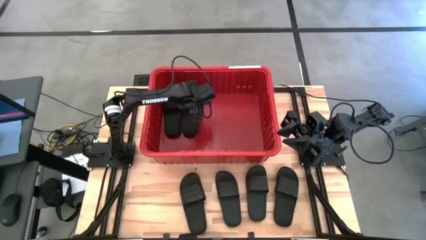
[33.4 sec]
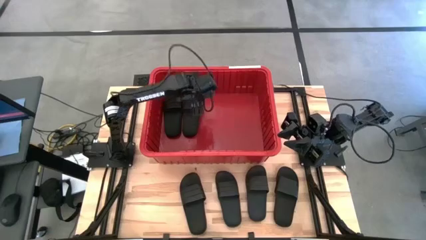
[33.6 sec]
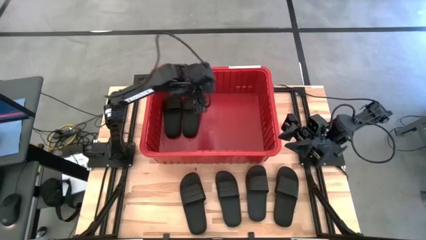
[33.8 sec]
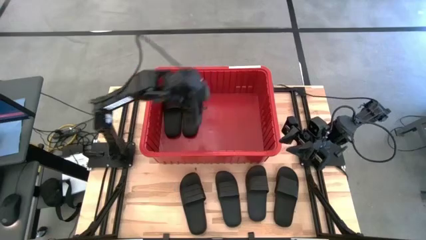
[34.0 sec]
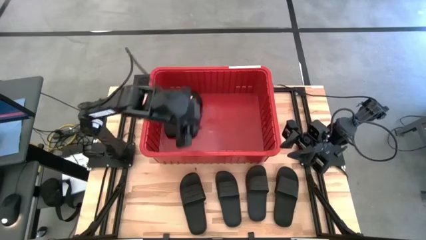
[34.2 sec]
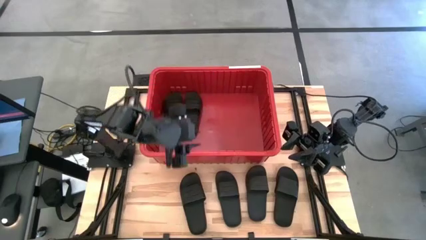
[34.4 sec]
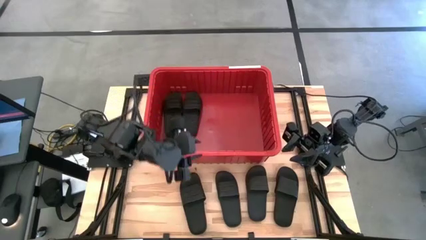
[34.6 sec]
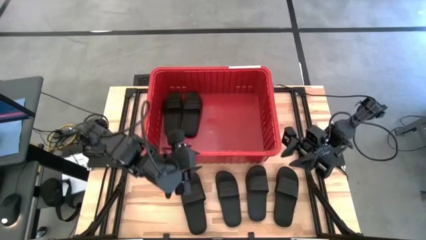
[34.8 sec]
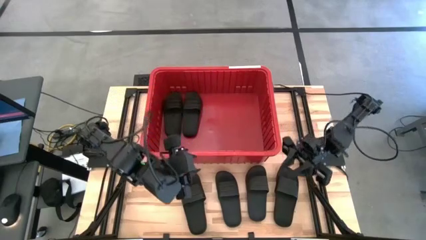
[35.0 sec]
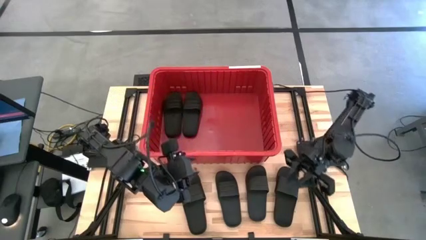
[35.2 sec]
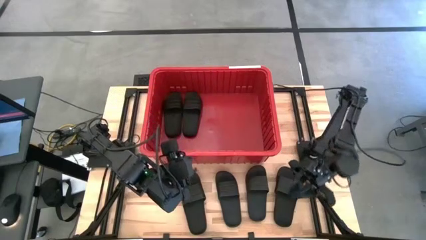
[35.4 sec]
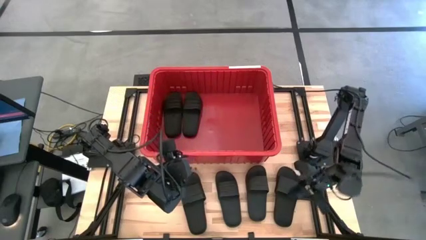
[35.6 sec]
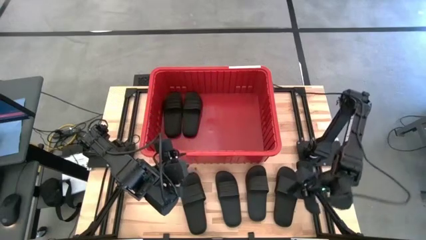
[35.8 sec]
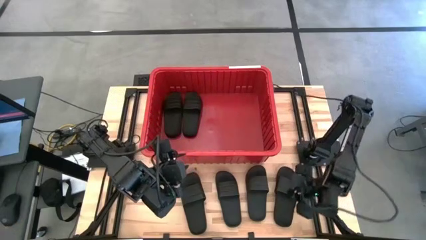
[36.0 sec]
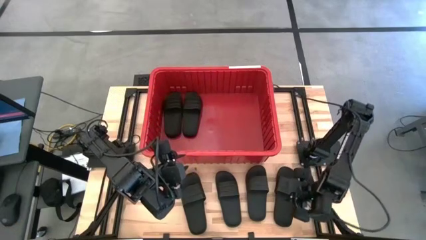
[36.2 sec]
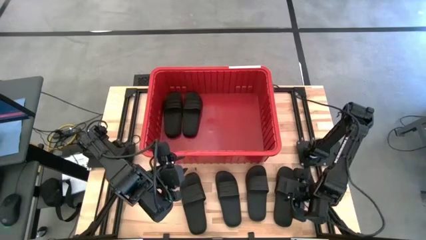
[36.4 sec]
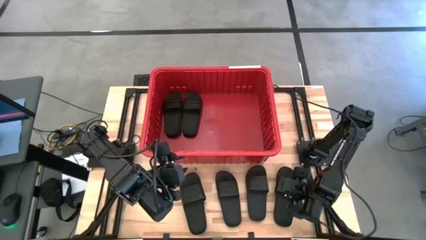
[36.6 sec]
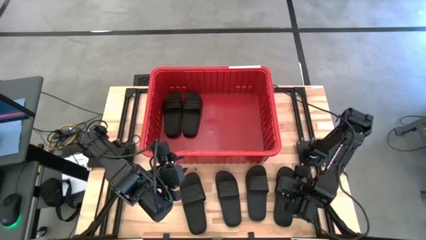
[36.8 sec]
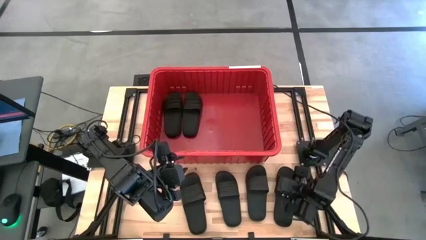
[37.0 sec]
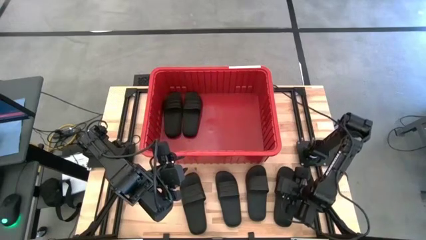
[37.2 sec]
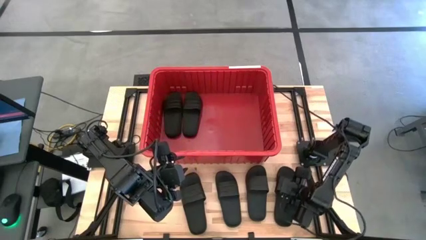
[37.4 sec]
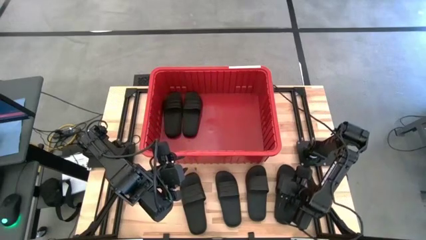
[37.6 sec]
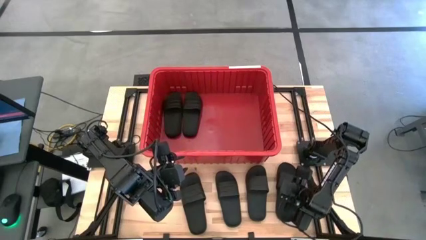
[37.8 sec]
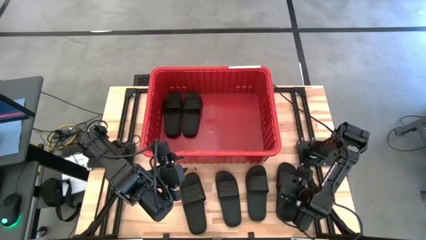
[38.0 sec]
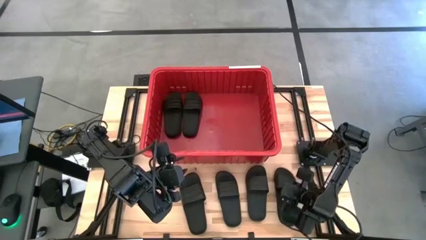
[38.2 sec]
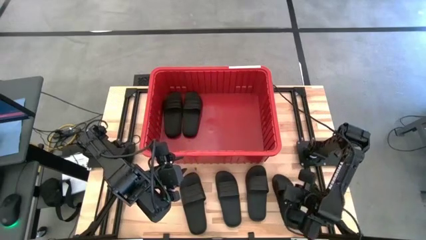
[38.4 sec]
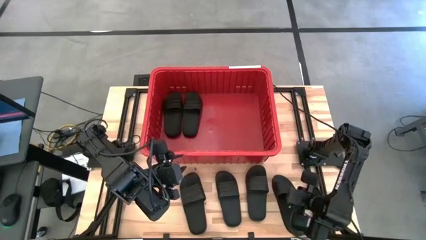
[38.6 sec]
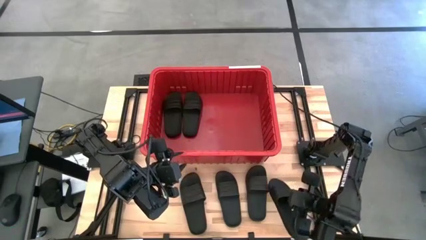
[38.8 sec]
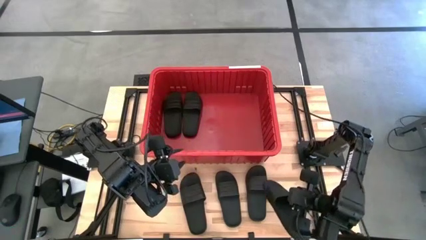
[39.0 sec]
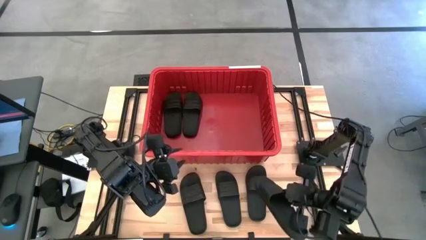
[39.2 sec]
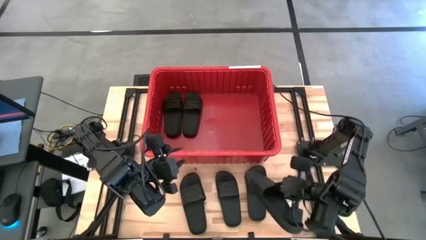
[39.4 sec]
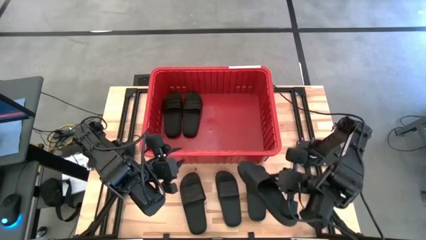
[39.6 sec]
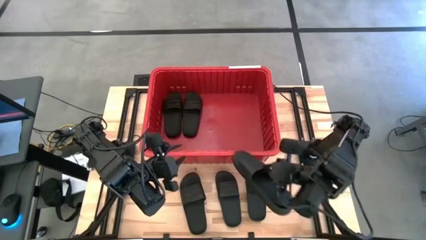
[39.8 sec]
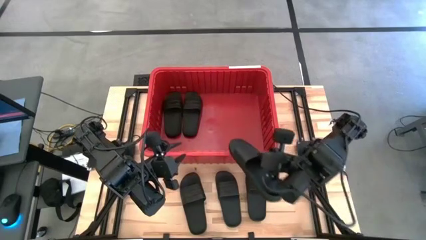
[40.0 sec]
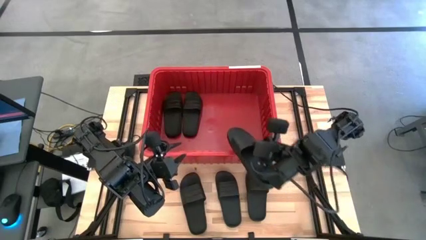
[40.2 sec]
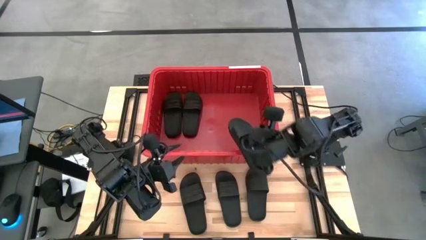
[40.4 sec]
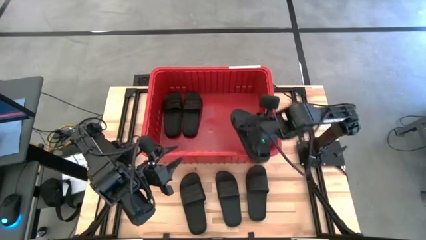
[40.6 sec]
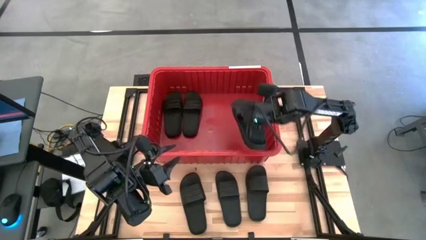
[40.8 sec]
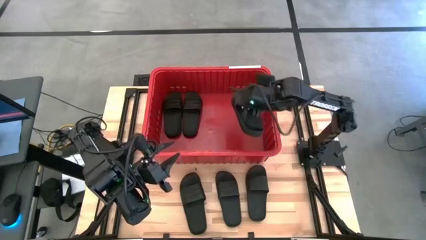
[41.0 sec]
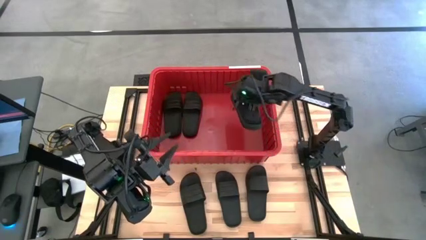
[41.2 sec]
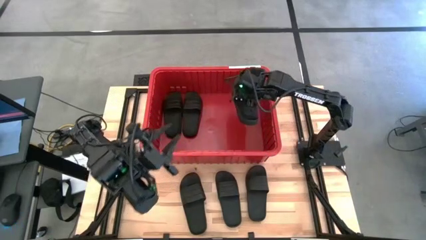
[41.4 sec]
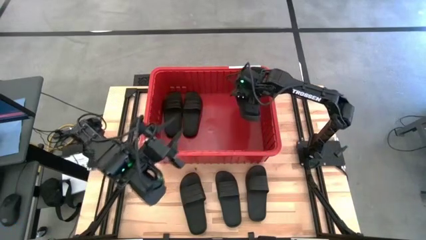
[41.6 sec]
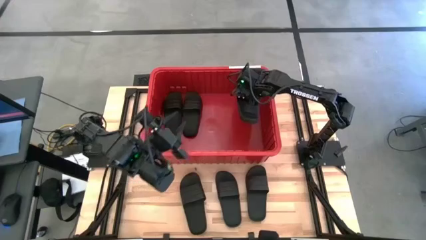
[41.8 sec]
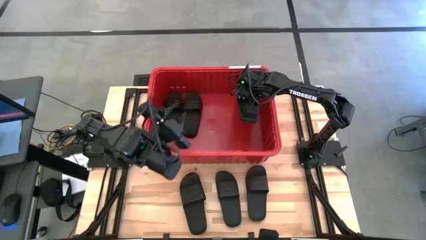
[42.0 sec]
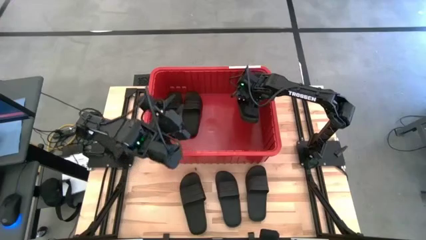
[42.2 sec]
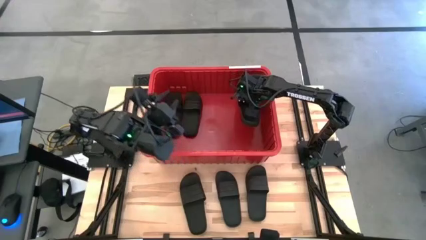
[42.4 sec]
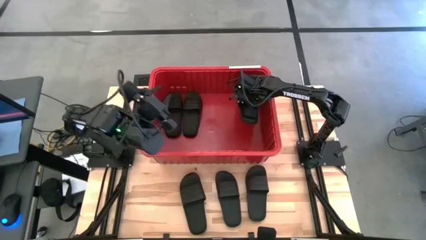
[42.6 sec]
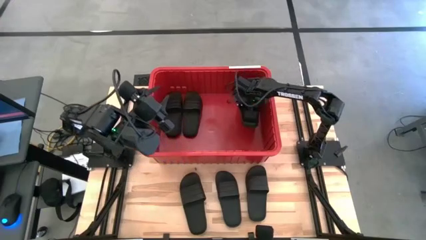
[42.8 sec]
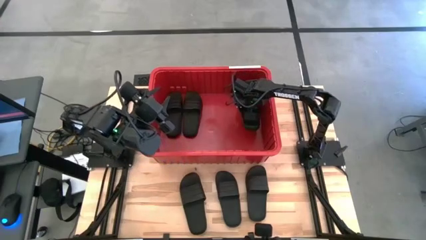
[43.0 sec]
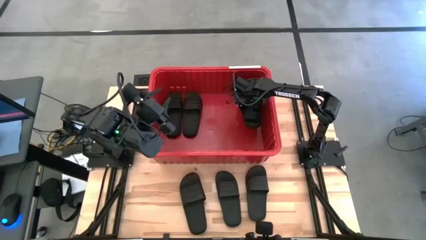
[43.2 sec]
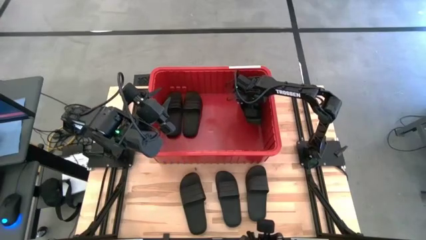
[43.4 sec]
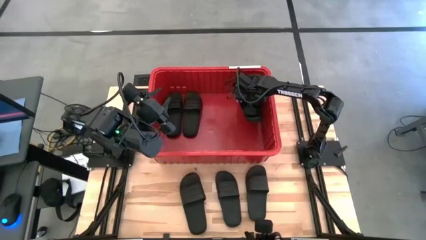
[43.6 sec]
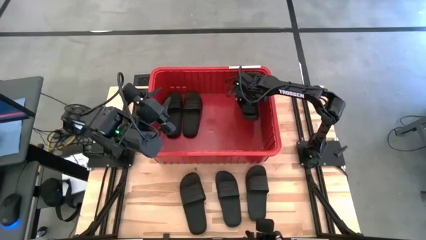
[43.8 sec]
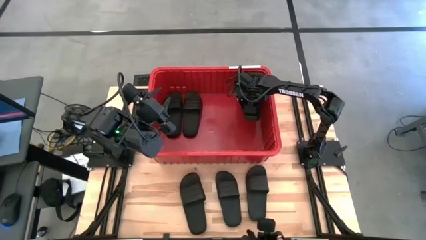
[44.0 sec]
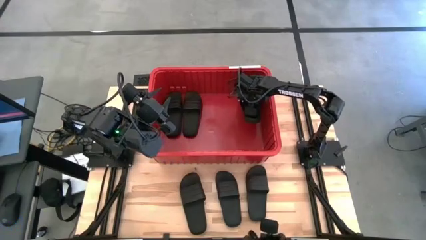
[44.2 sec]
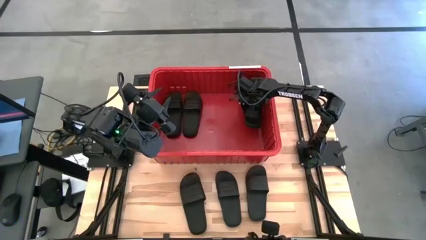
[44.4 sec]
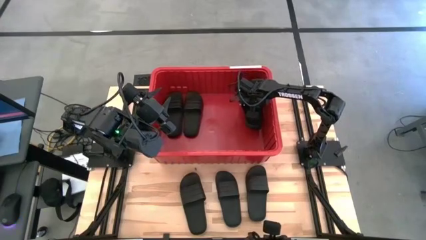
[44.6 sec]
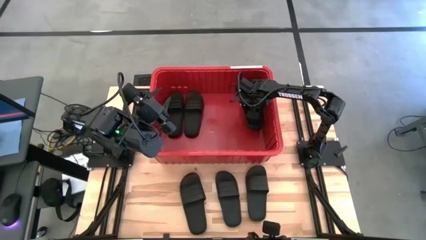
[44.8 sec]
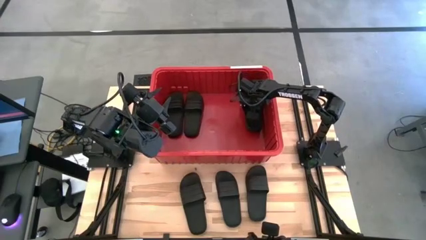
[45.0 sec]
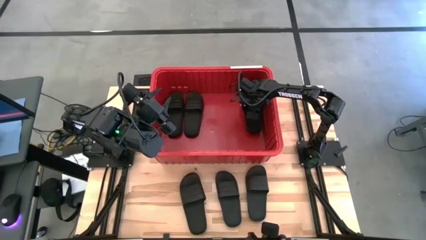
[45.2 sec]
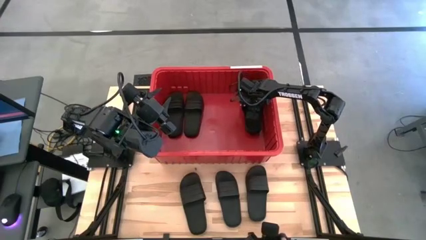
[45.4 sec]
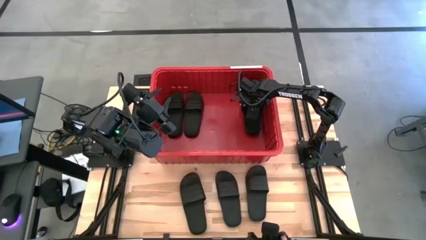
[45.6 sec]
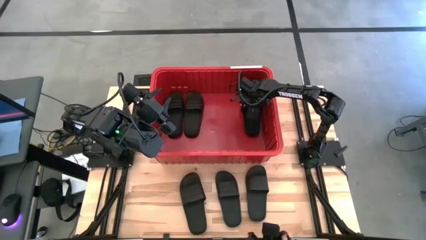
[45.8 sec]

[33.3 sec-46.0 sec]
Task: Pick and place slides into bin
Put the black slides into the red bin
